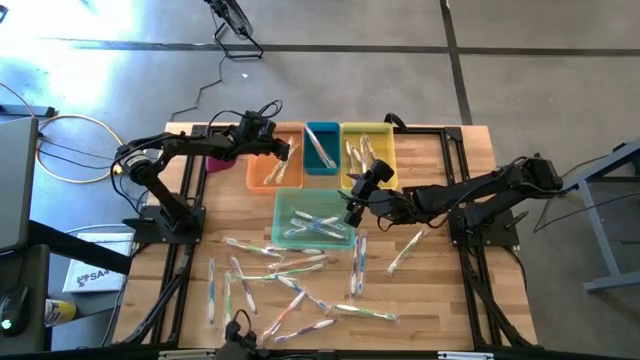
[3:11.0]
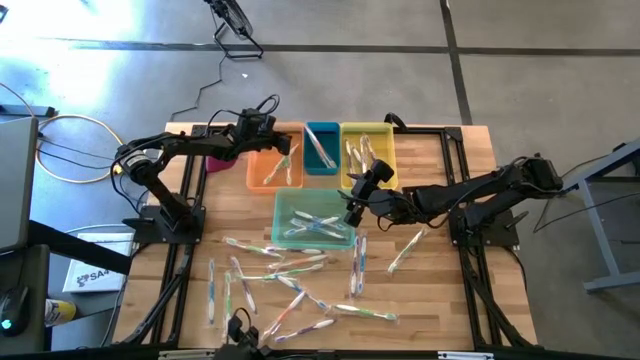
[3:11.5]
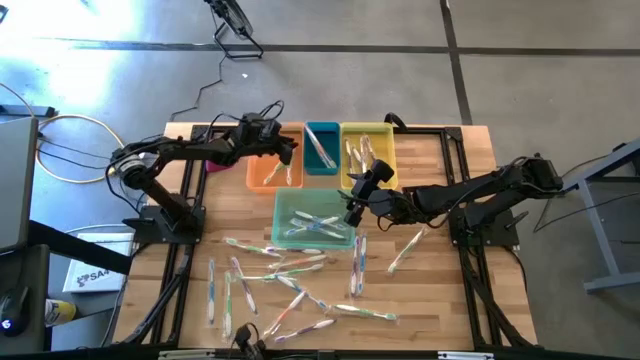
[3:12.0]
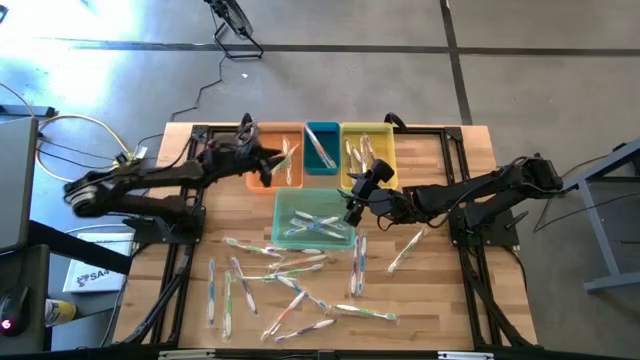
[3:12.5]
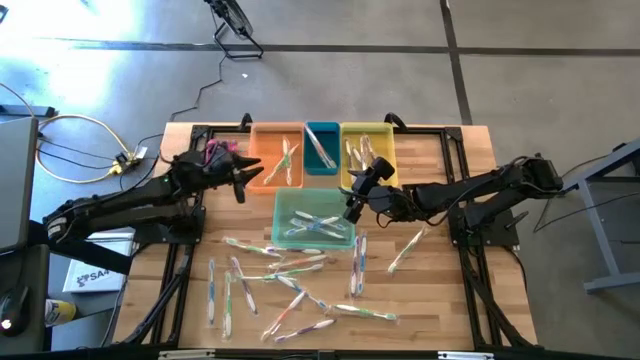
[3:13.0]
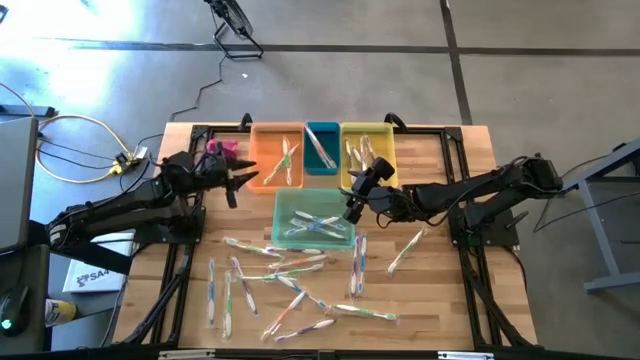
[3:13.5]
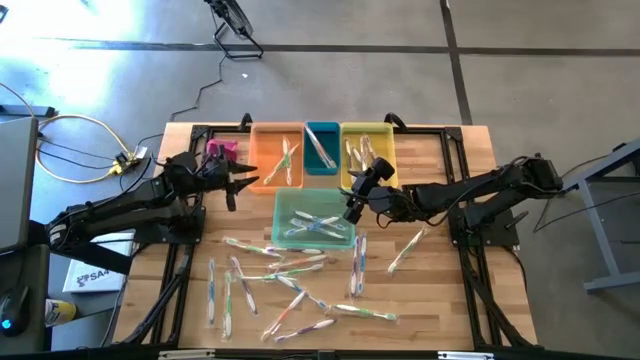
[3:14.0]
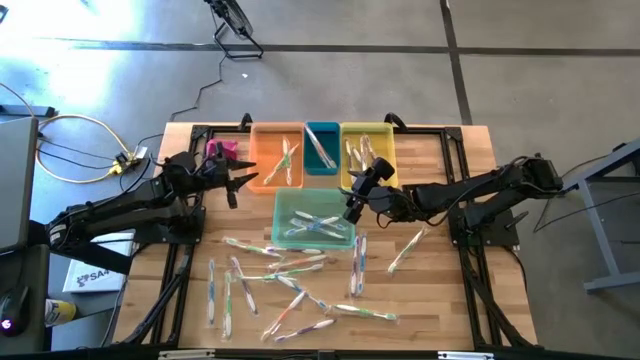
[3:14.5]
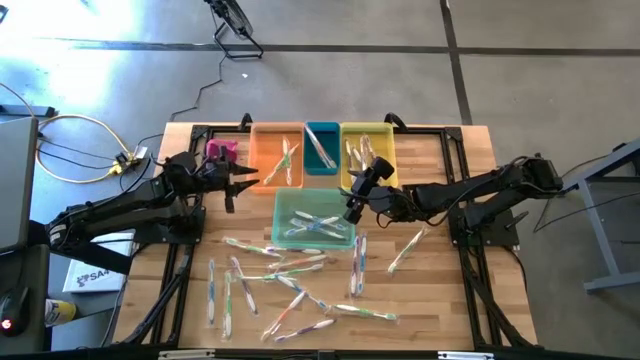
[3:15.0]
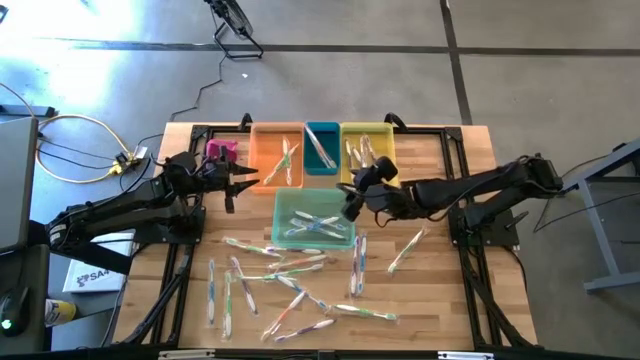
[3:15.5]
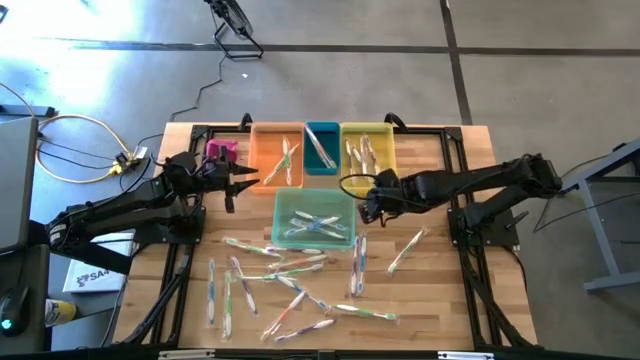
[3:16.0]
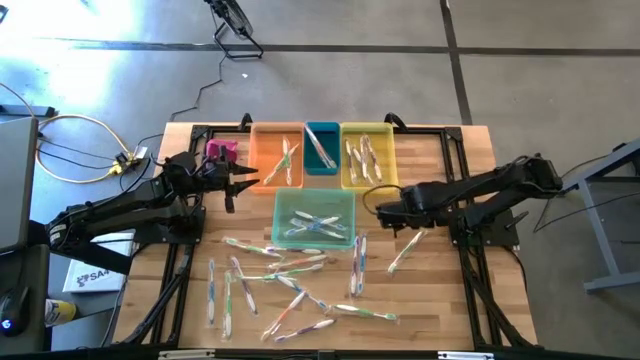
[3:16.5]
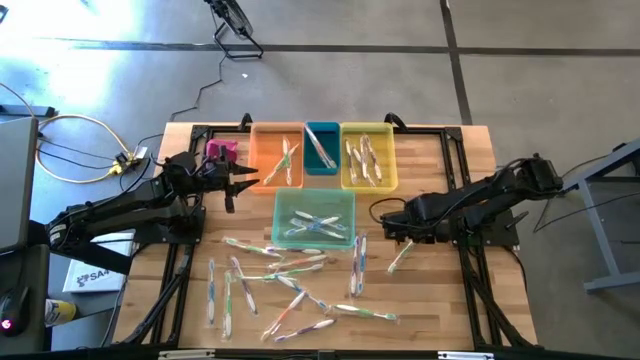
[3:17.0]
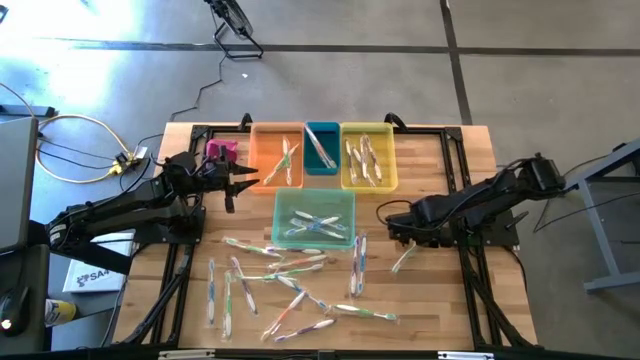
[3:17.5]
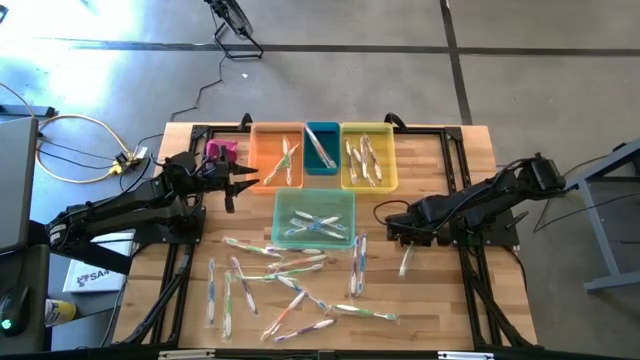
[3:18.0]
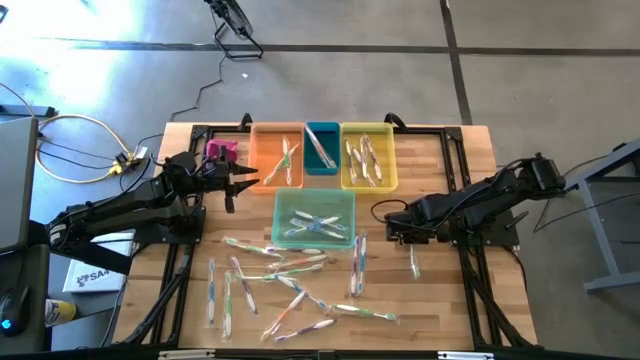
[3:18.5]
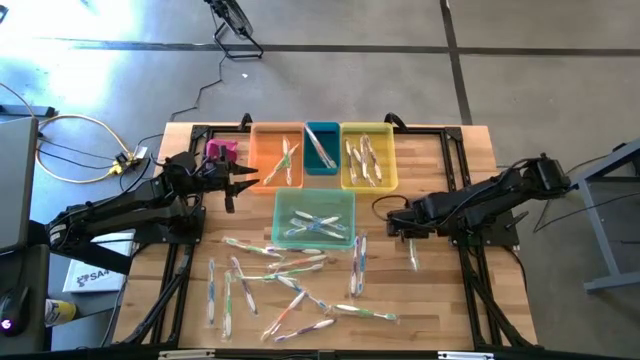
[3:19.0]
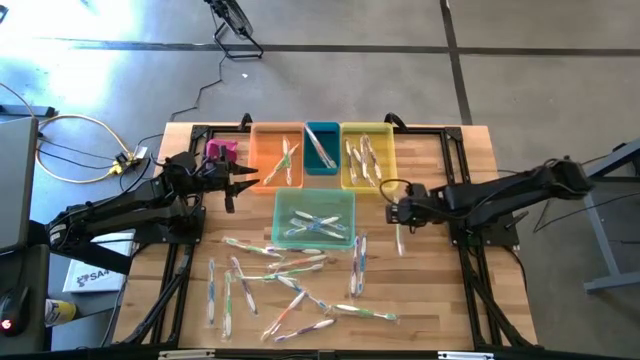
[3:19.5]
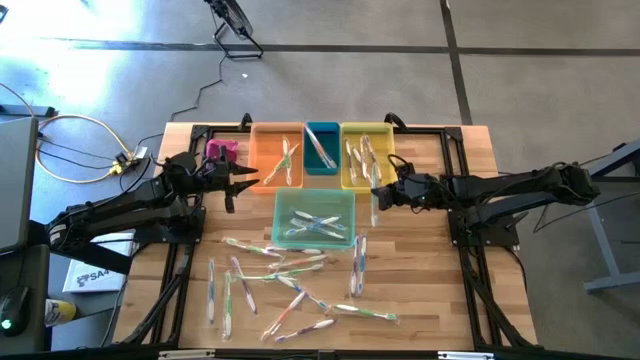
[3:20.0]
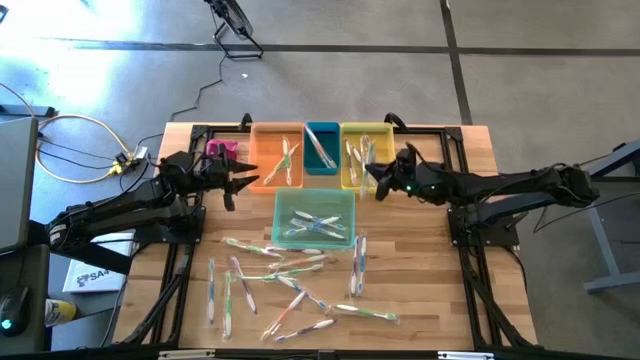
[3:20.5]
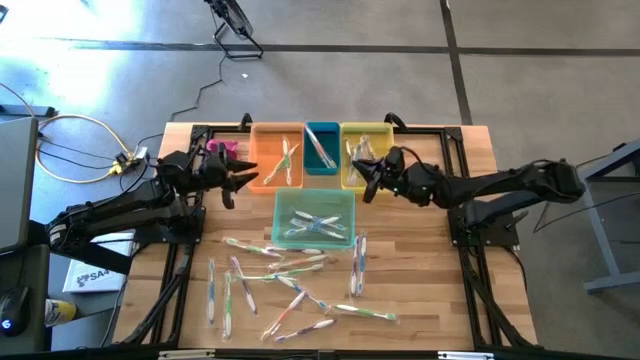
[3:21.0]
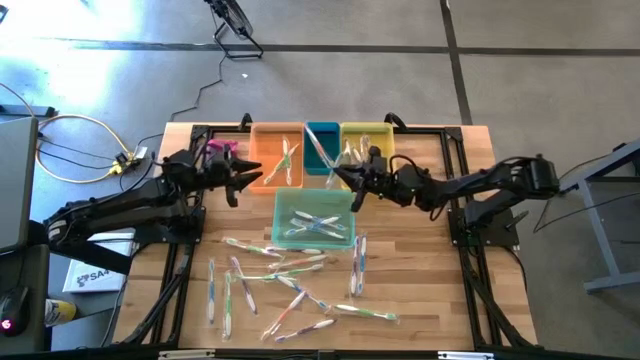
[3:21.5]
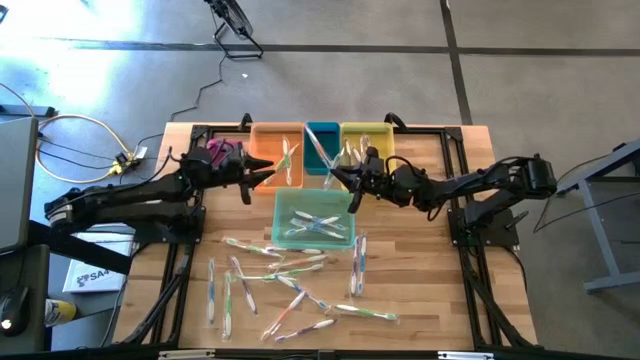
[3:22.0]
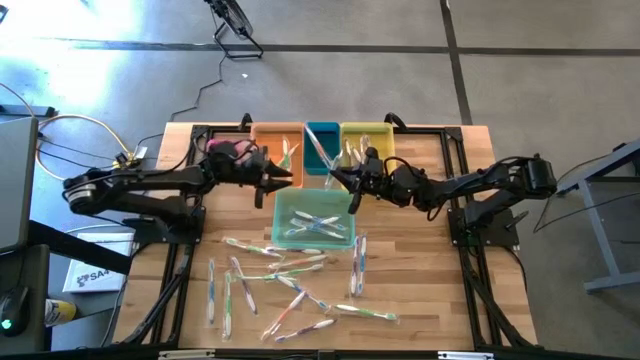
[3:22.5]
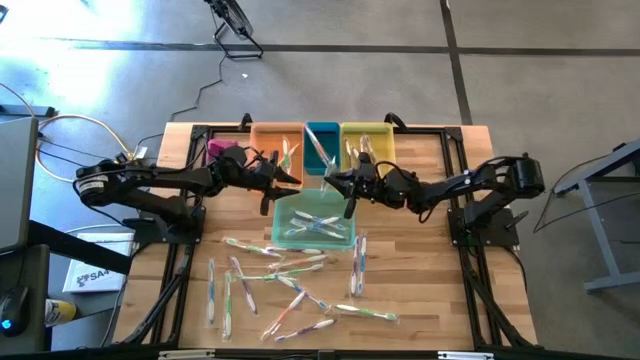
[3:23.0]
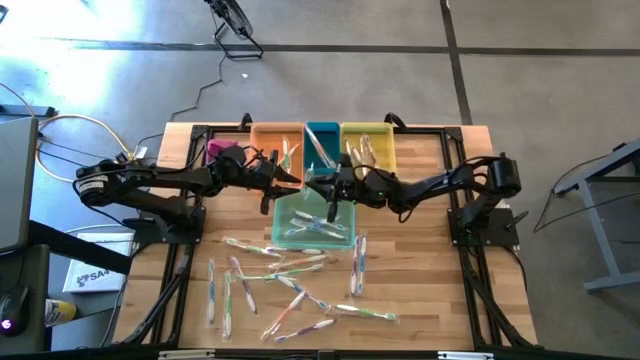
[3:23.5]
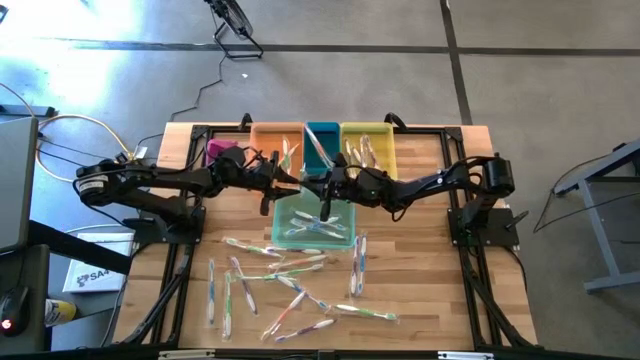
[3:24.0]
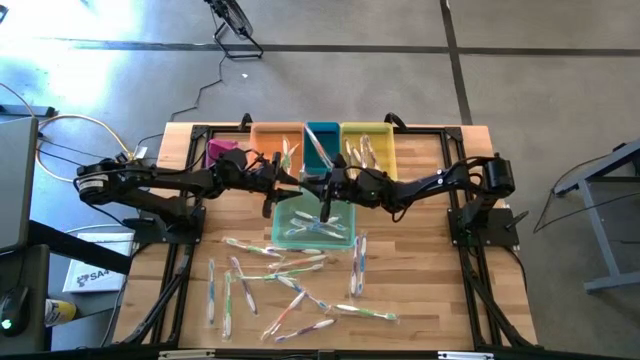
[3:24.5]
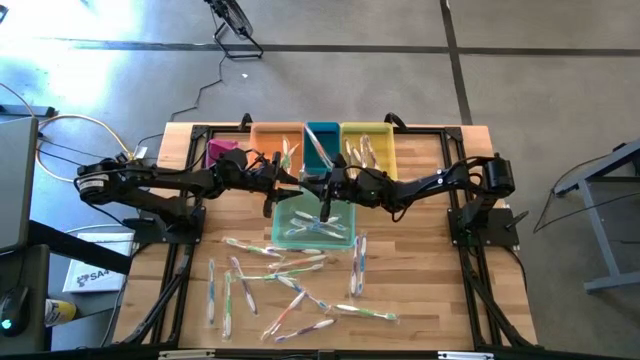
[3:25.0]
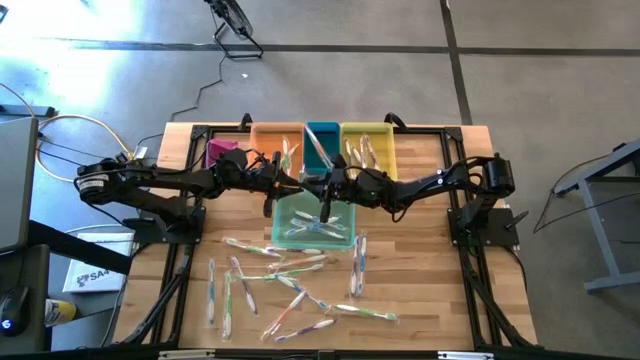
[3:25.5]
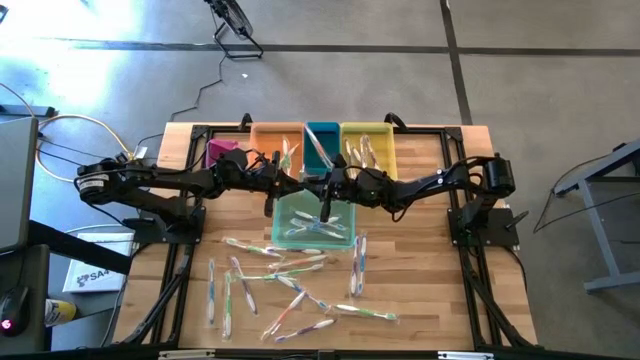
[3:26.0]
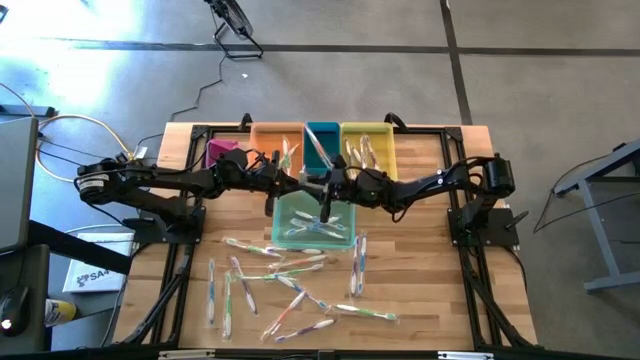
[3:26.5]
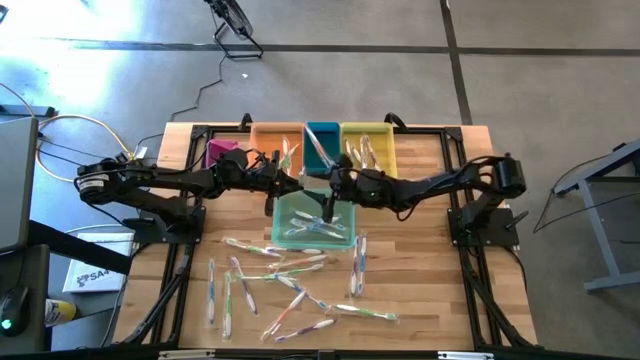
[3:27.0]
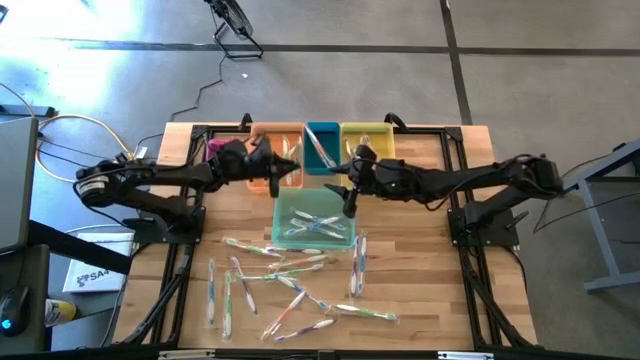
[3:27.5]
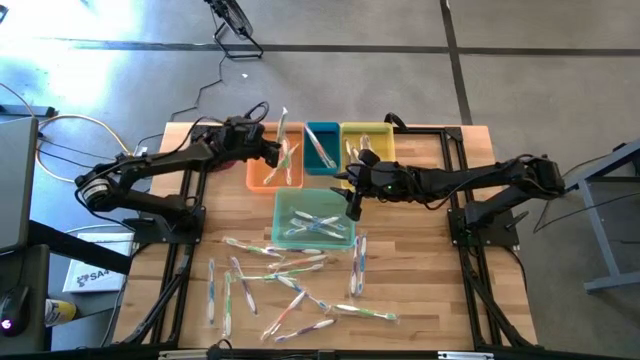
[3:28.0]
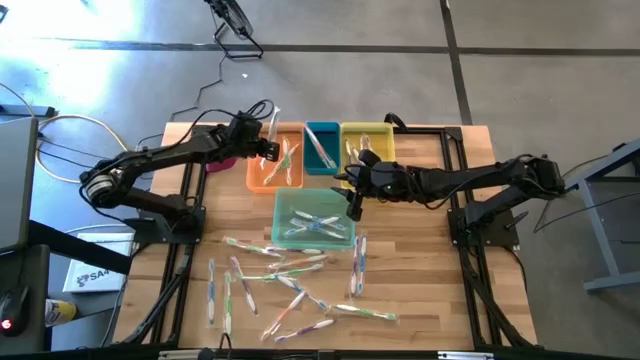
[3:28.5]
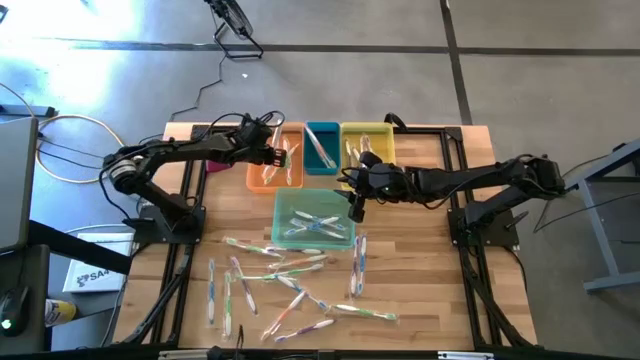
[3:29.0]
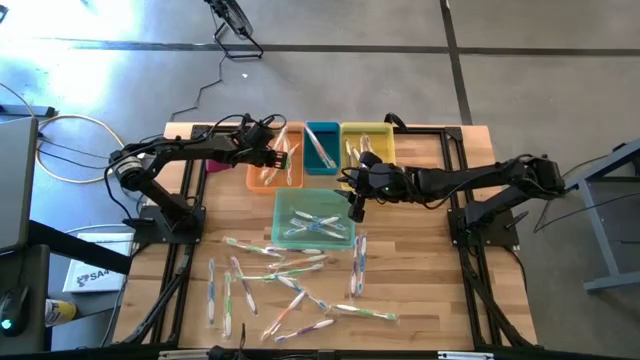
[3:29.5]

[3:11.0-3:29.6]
Task: Pick & Place Toothbrushes
Put the green toothbrush into the orange bin
